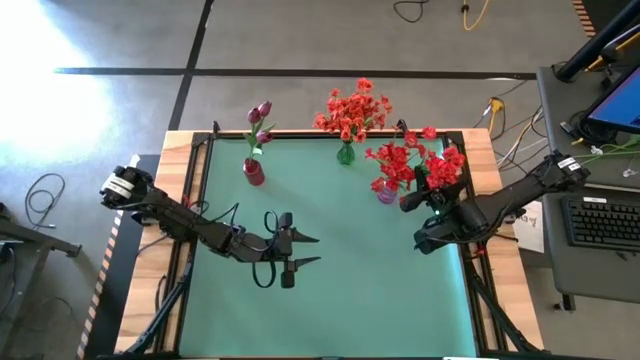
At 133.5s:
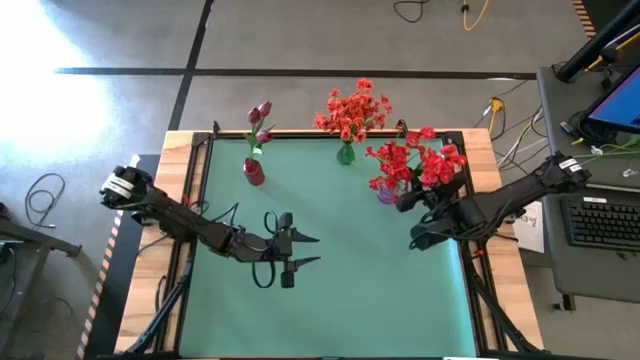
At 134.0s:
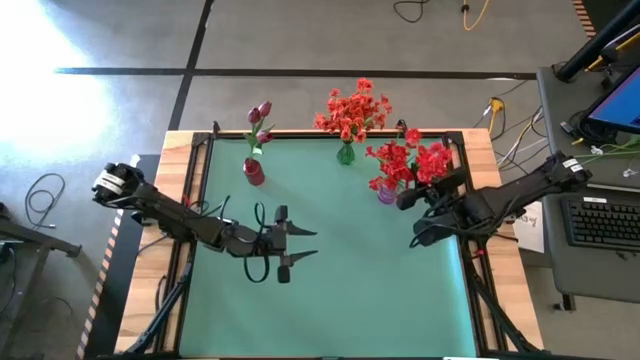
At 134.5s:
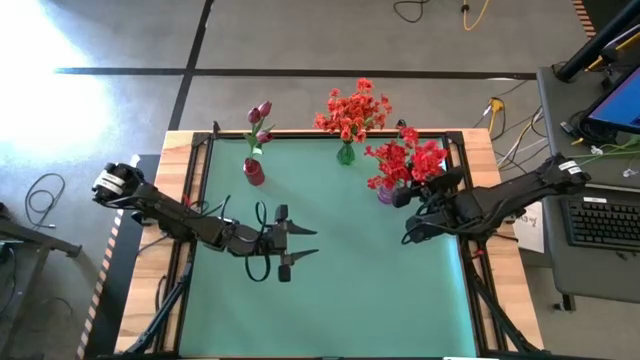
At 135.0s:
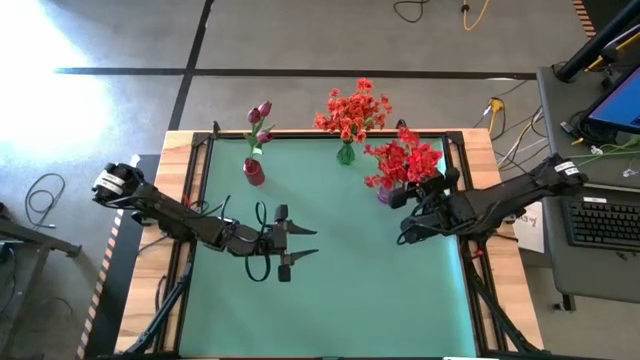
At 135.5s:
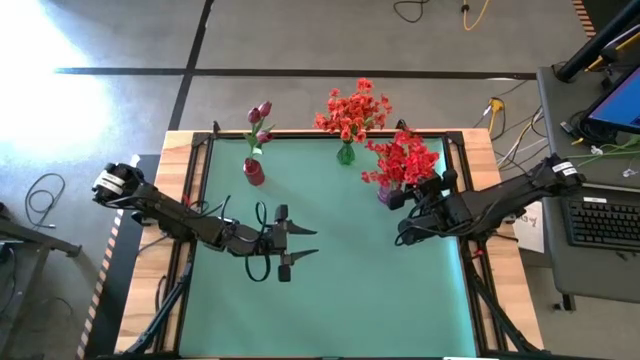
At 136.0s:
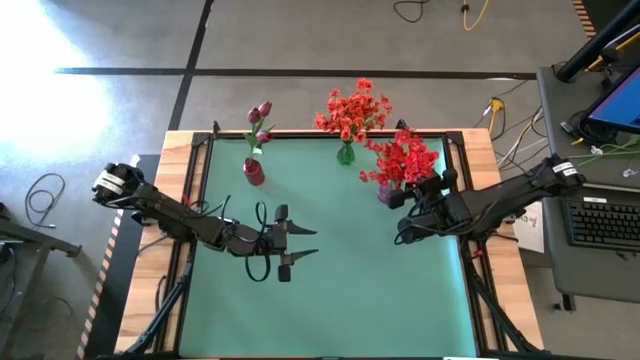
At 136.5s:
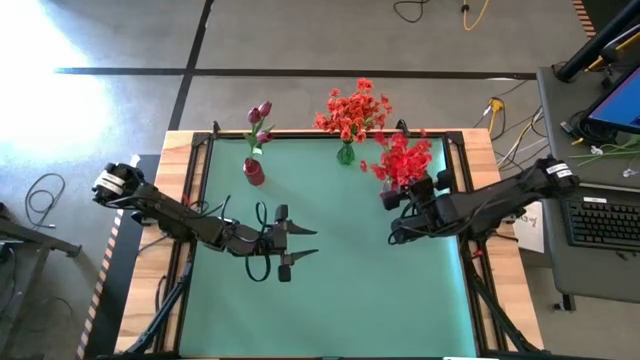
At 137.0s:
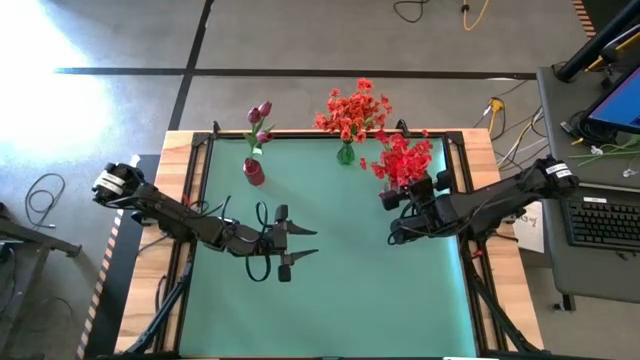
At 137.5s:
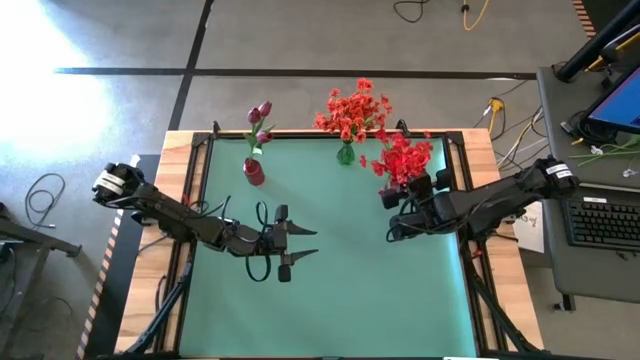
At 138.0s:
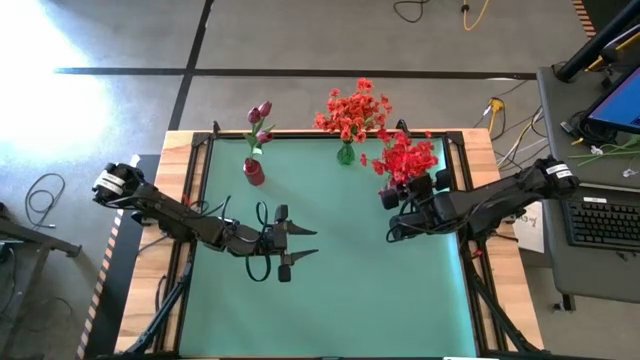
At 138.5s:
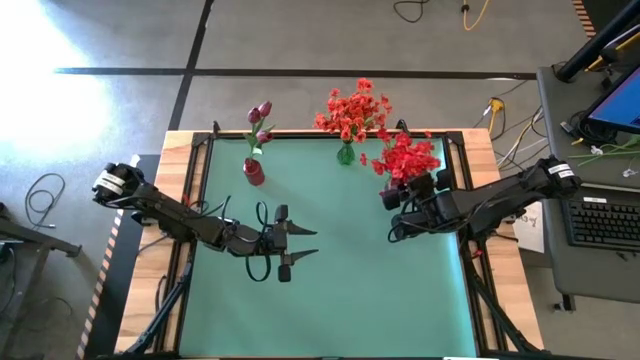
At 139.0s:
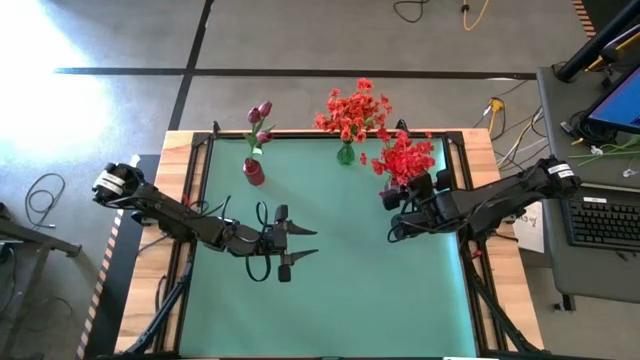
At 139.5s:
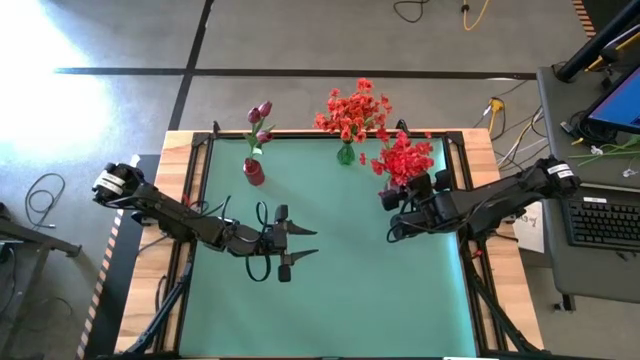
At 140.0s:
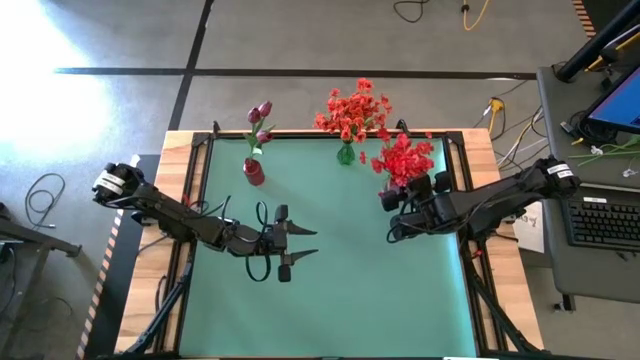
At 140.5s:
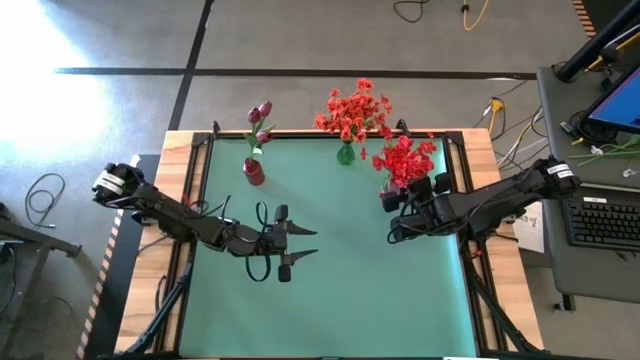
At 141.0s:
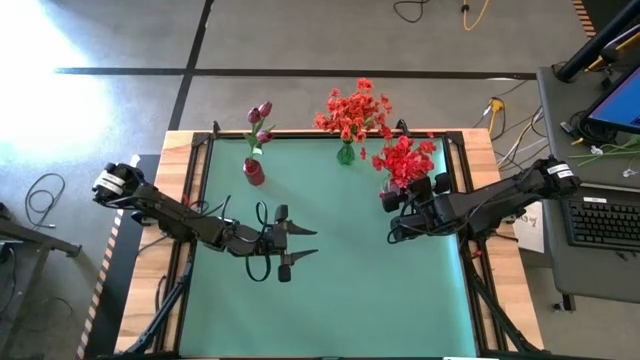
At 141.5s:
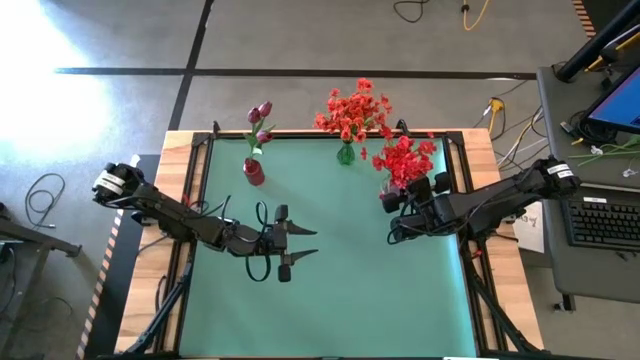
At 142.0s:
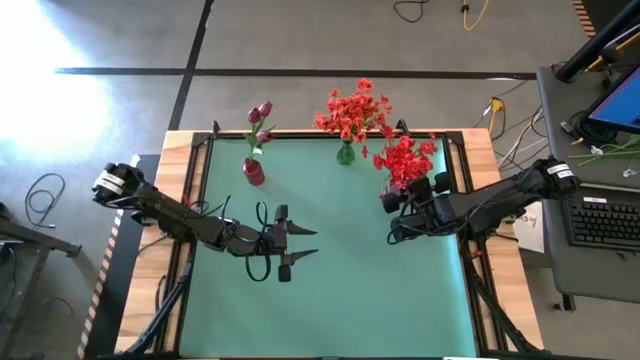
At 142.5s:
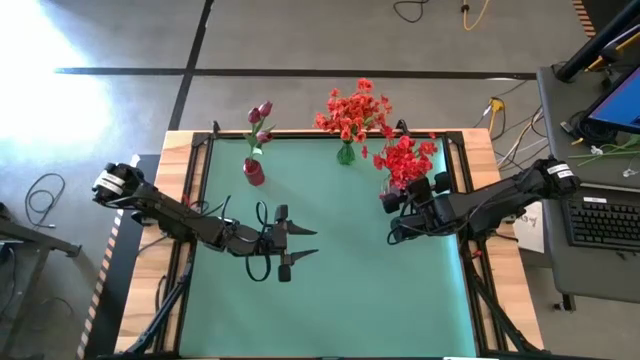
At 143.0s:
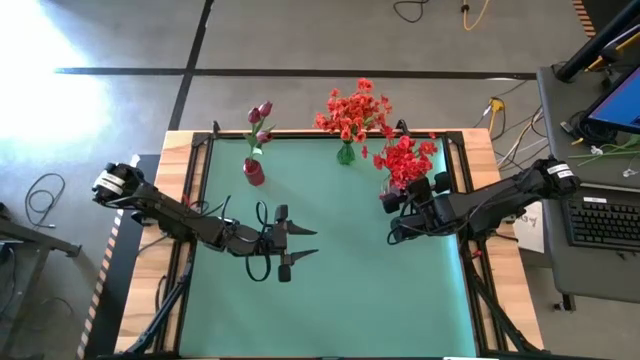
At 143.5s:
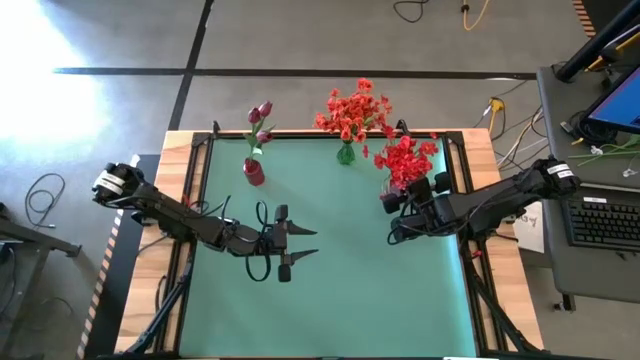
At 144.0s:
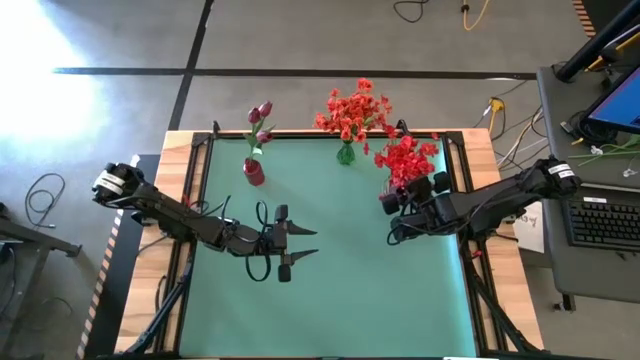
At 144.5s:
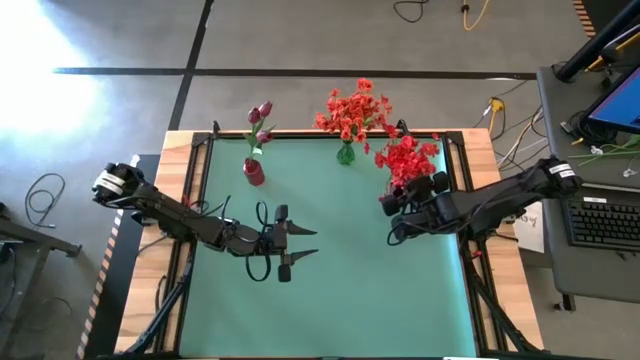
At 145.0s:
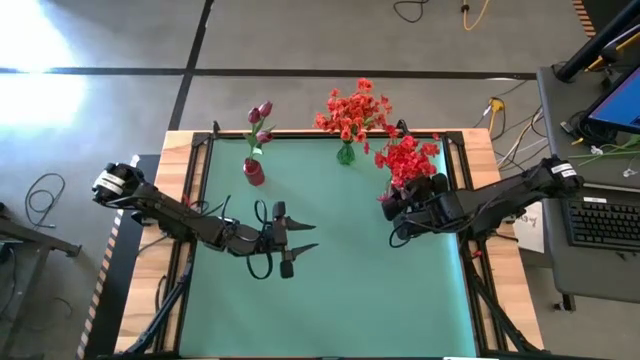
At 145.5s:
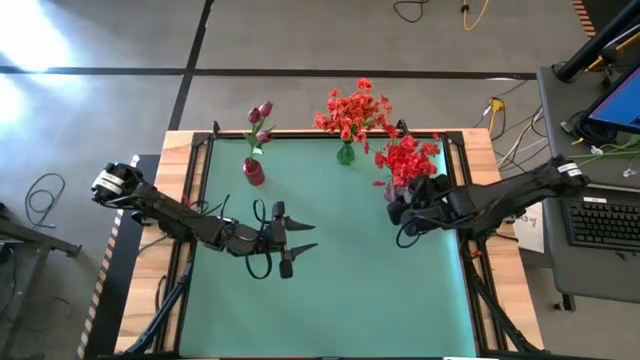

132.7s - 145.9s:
Task: Sort flowers into vase by color
Put the red flowers into the violet flower vase

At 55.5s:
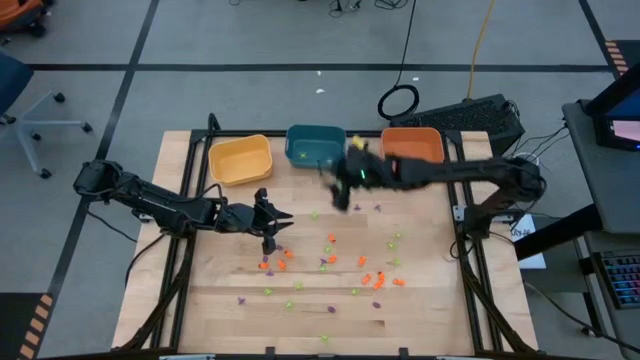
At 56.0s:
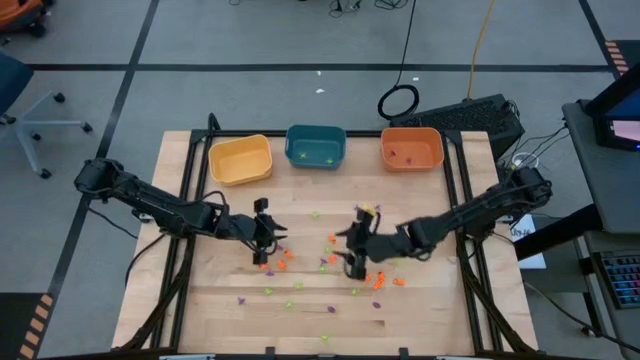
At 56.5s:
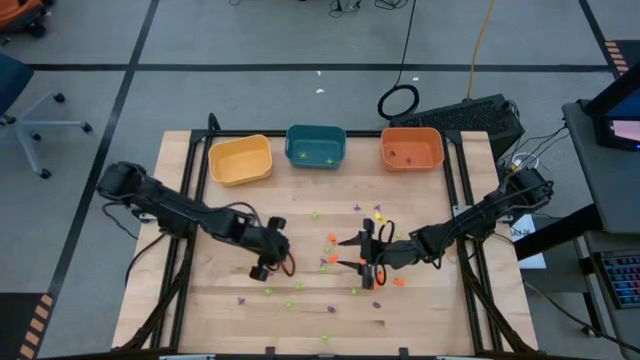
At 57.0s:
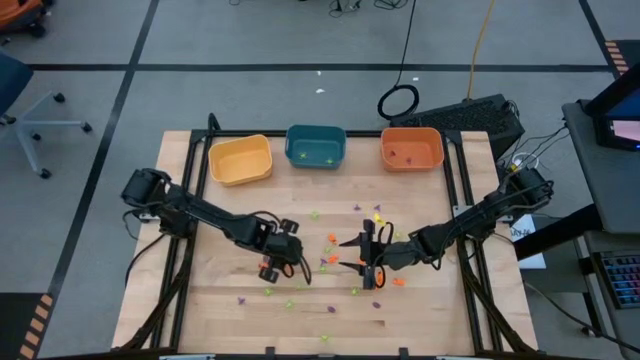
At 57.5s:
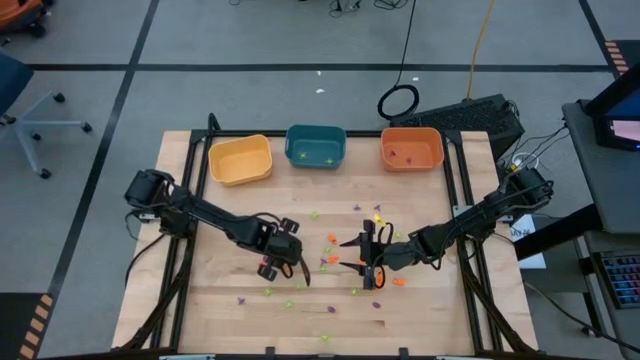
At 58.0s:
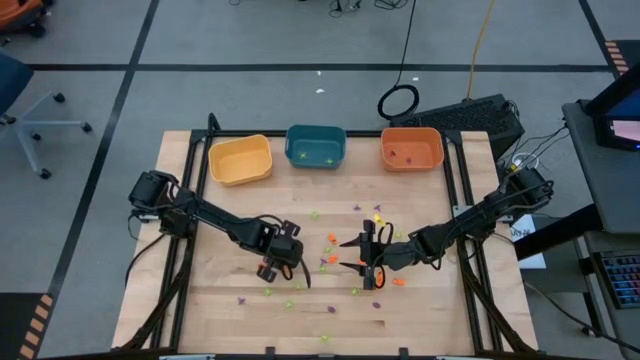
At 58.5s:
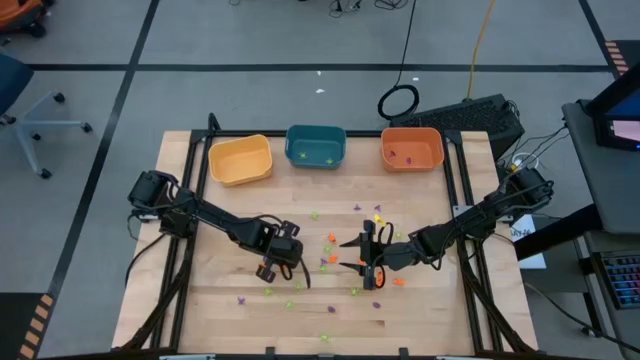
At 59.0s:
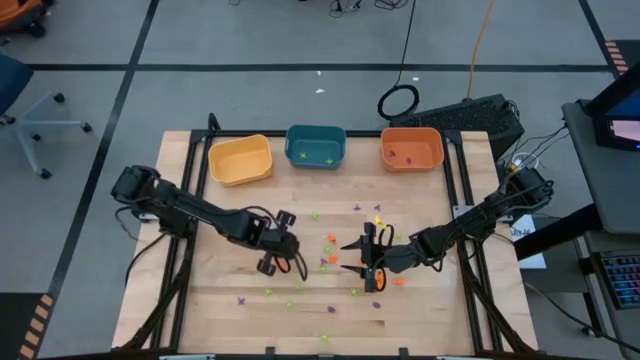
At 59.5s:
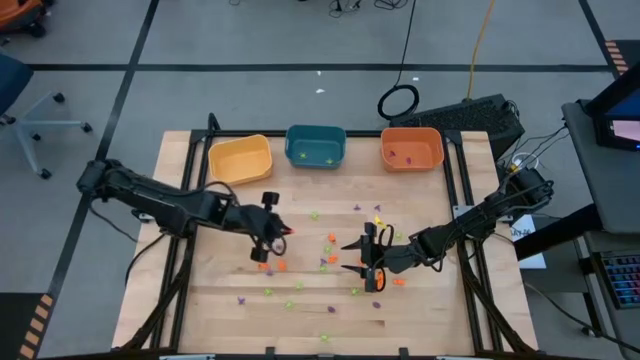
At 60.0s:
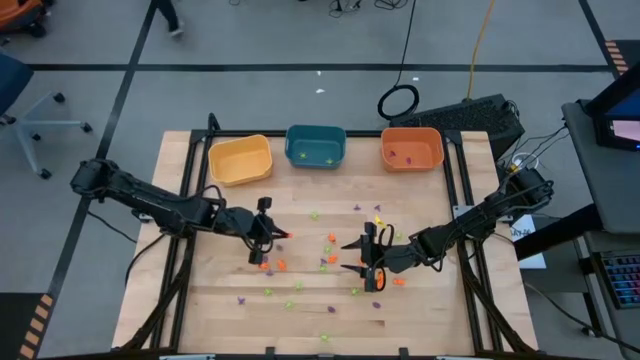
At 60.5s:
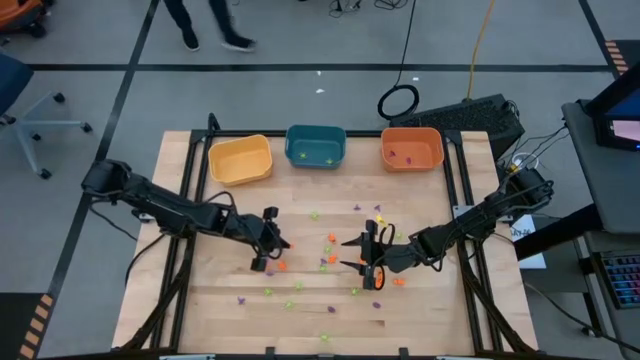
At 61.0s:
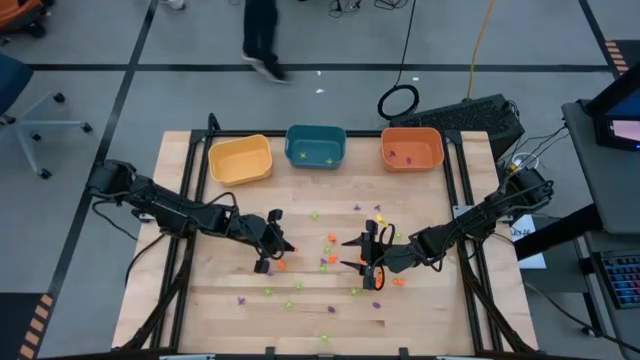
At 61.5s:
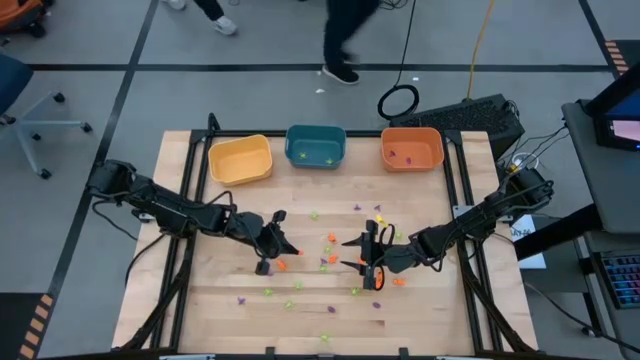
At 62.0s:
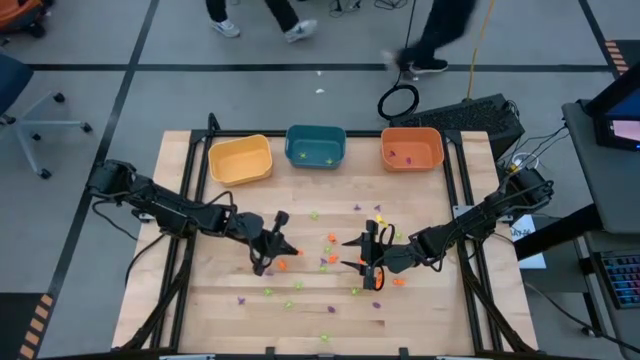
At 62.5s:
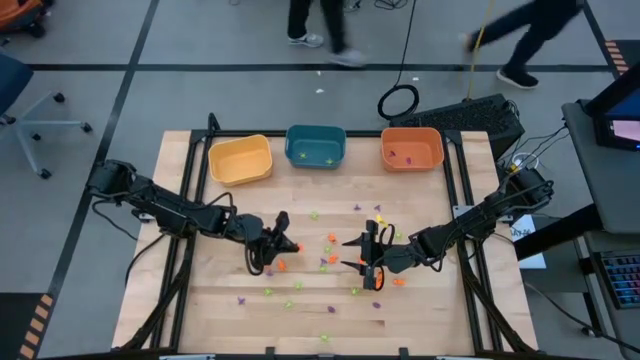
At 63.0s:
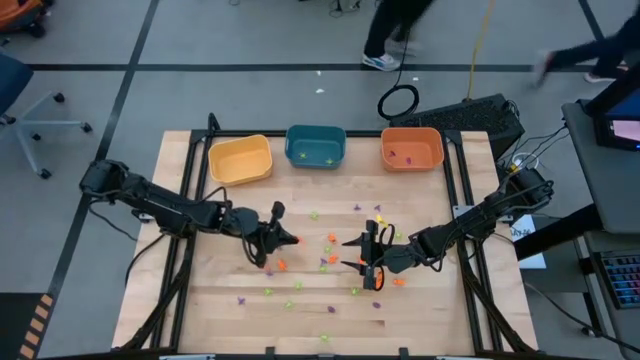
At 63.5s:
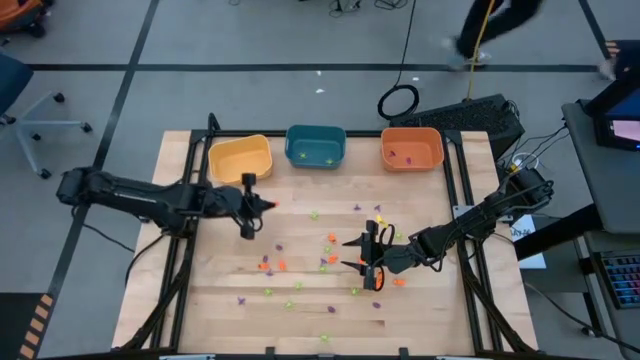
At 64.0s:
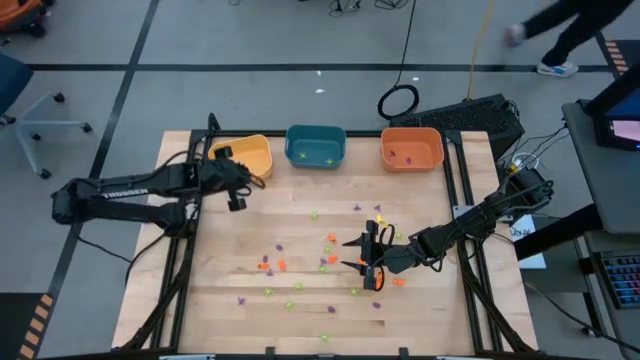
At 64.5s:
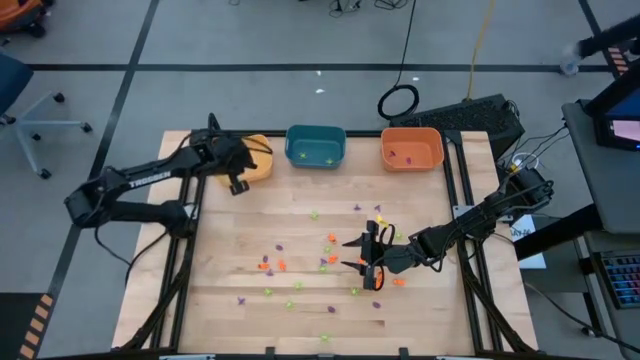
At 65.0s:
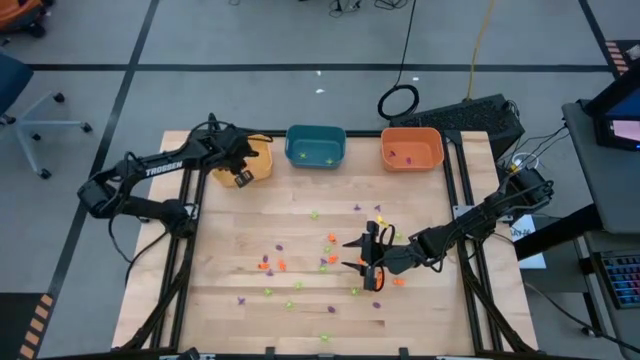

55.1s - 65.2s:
Task: Sort Halloween decoration
Put the orange skeleton toy into the yellow bin
